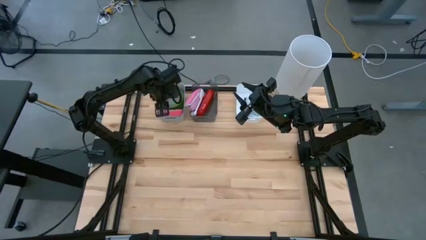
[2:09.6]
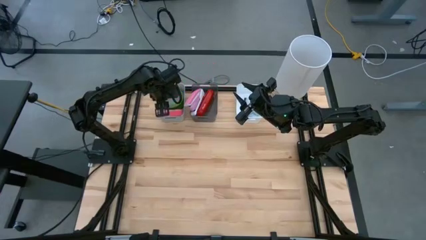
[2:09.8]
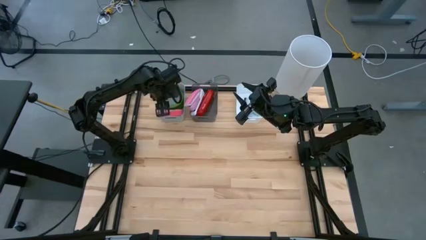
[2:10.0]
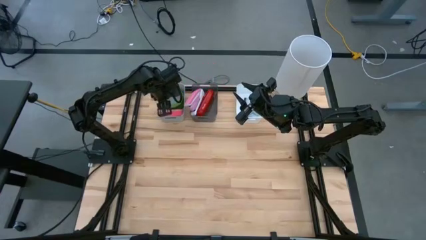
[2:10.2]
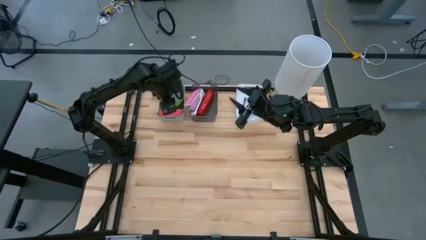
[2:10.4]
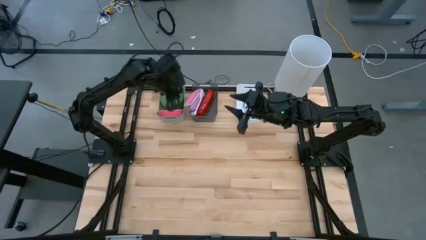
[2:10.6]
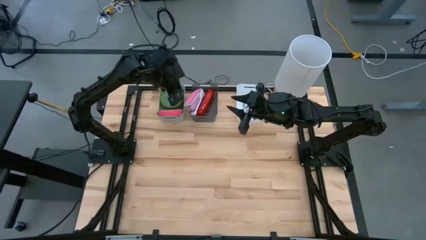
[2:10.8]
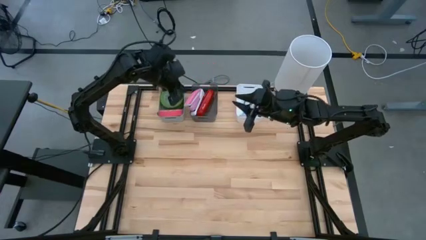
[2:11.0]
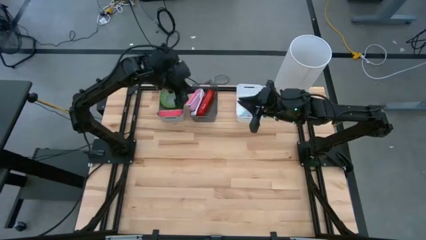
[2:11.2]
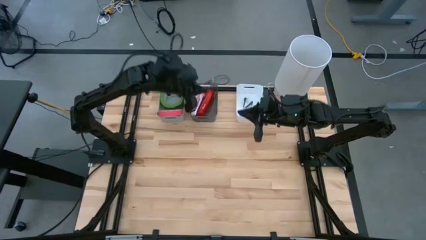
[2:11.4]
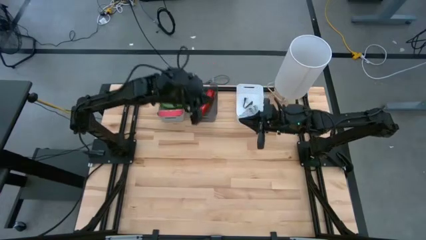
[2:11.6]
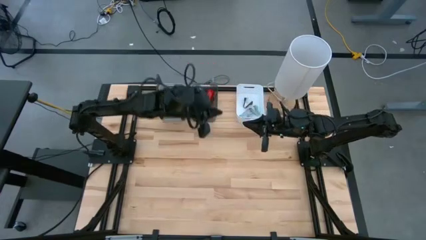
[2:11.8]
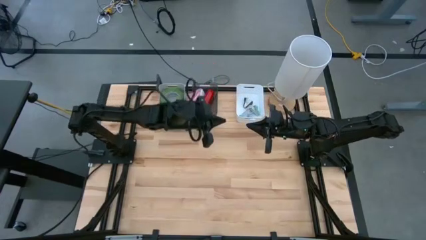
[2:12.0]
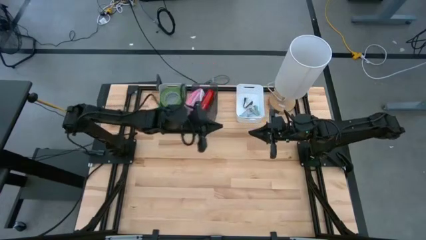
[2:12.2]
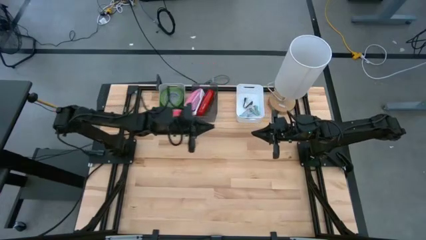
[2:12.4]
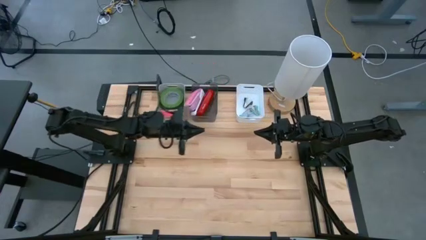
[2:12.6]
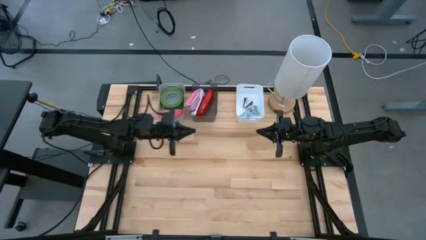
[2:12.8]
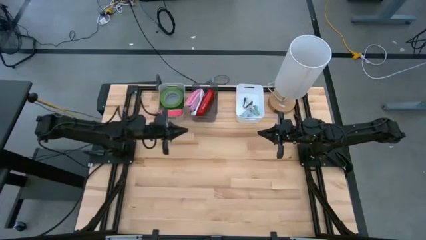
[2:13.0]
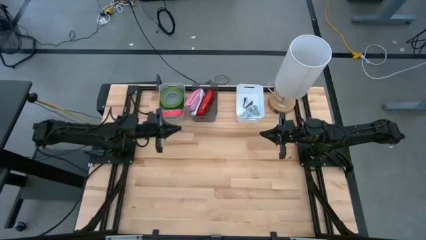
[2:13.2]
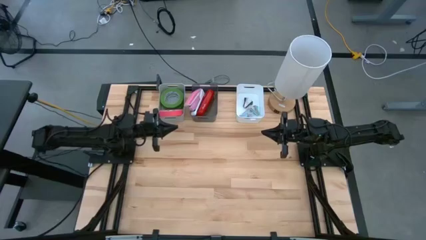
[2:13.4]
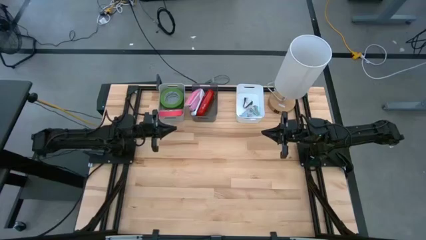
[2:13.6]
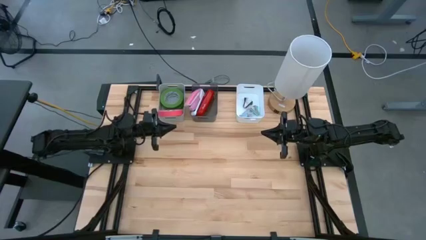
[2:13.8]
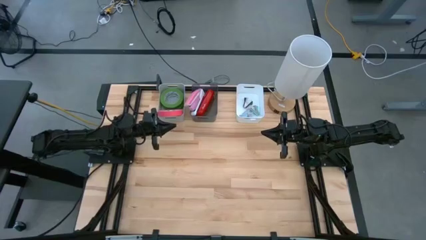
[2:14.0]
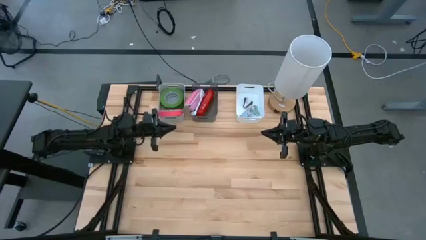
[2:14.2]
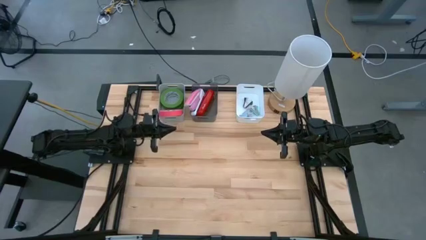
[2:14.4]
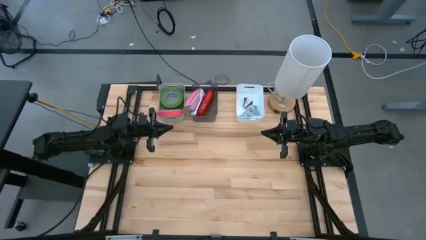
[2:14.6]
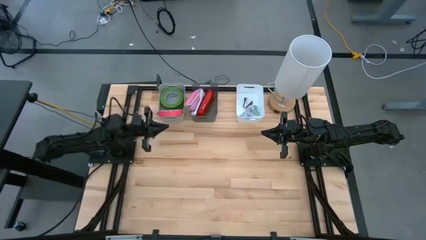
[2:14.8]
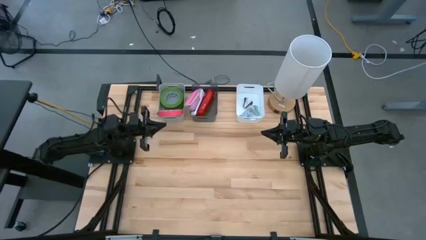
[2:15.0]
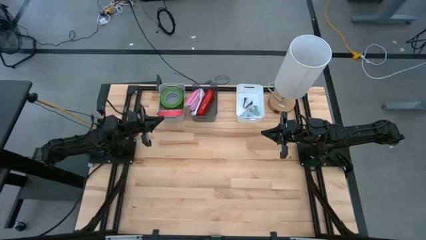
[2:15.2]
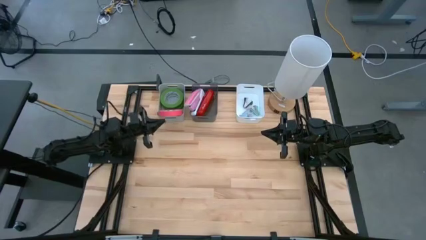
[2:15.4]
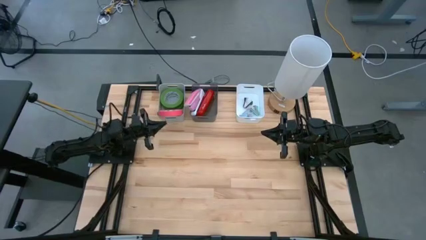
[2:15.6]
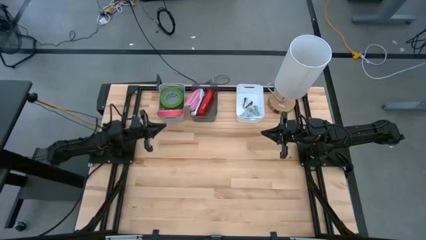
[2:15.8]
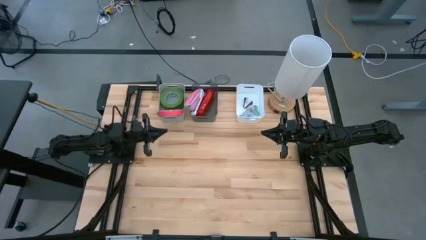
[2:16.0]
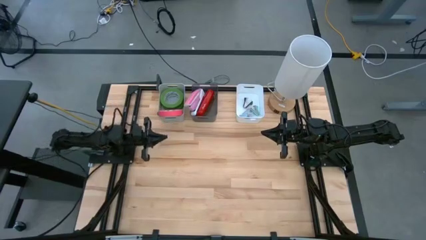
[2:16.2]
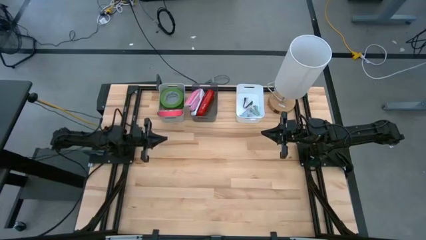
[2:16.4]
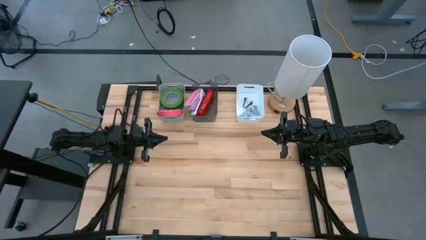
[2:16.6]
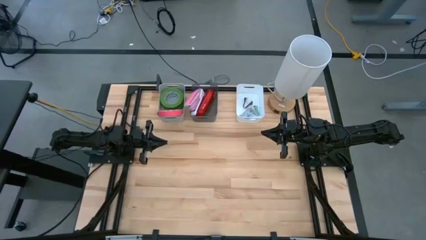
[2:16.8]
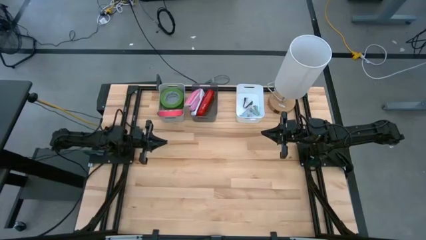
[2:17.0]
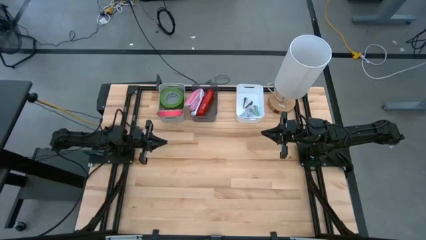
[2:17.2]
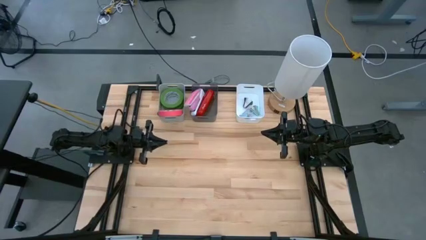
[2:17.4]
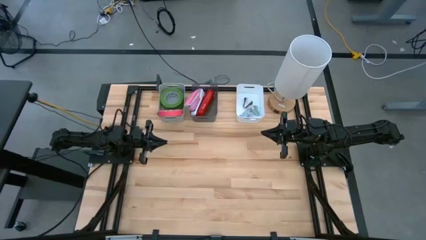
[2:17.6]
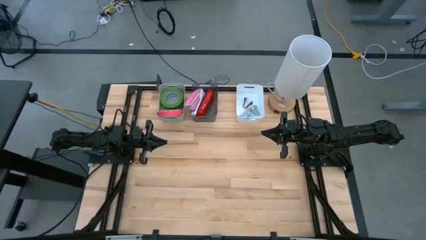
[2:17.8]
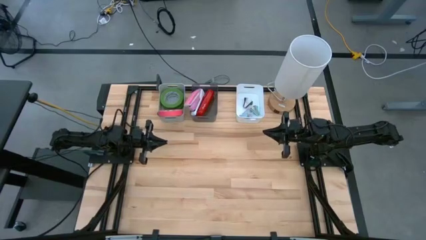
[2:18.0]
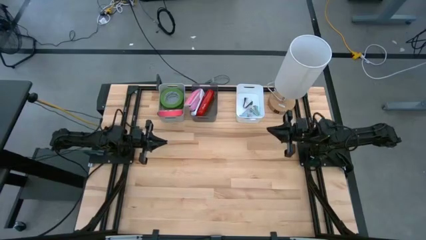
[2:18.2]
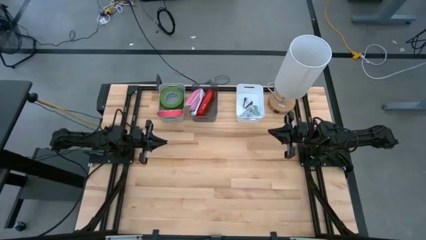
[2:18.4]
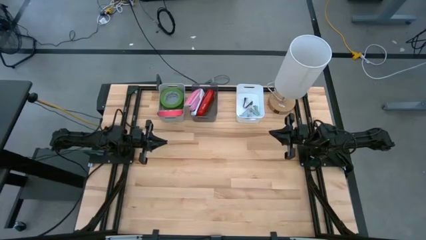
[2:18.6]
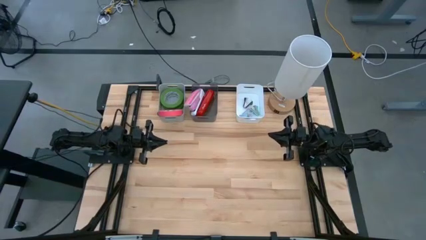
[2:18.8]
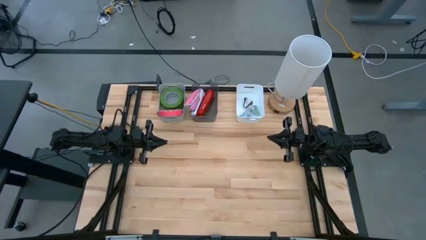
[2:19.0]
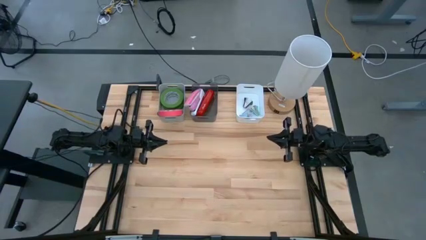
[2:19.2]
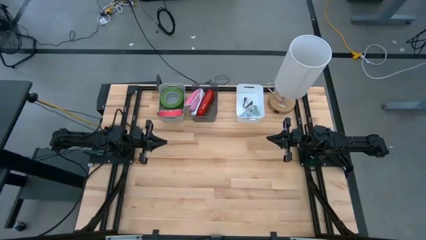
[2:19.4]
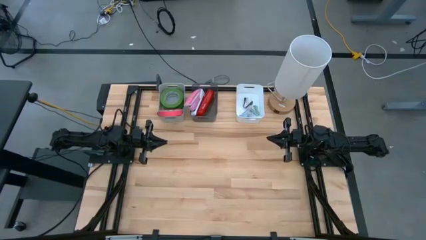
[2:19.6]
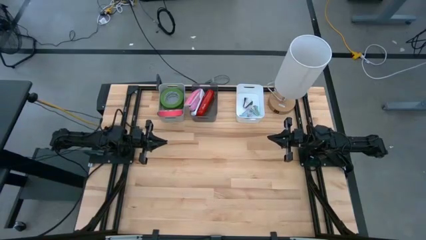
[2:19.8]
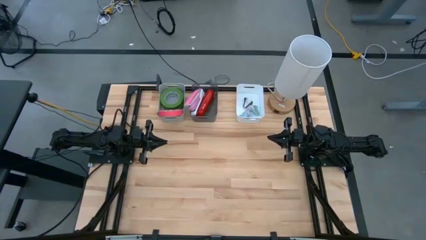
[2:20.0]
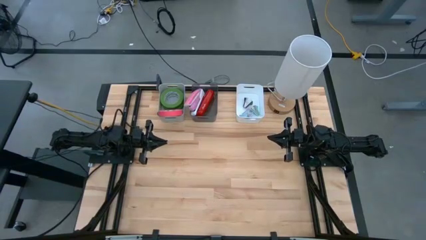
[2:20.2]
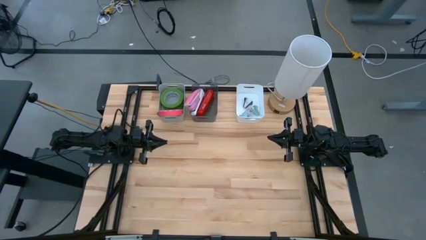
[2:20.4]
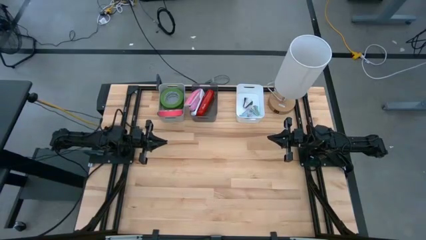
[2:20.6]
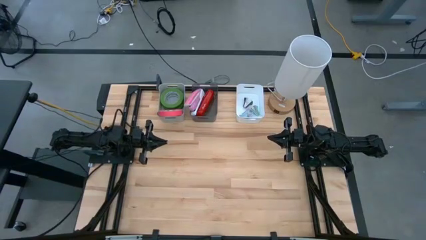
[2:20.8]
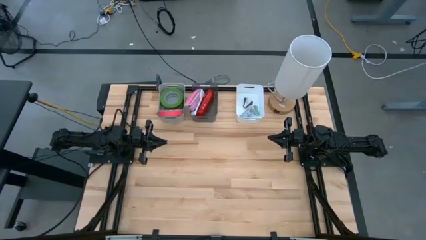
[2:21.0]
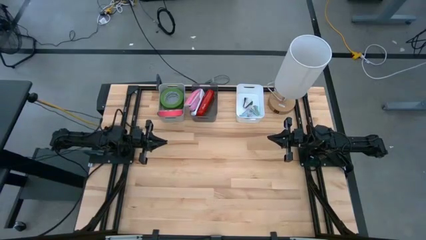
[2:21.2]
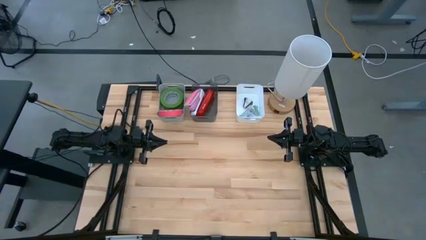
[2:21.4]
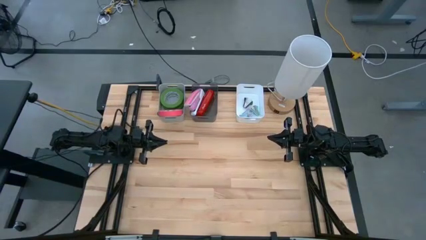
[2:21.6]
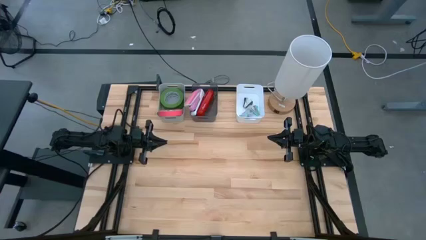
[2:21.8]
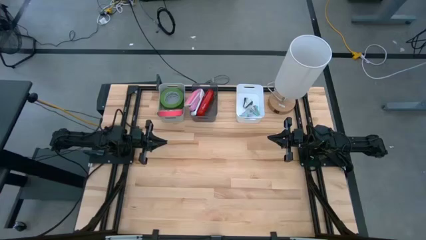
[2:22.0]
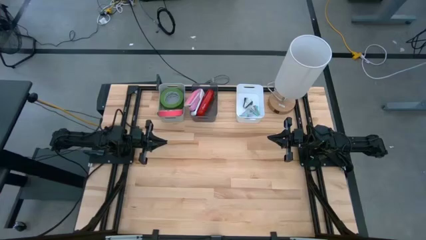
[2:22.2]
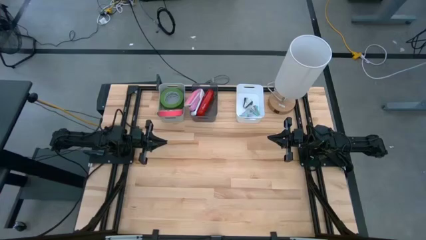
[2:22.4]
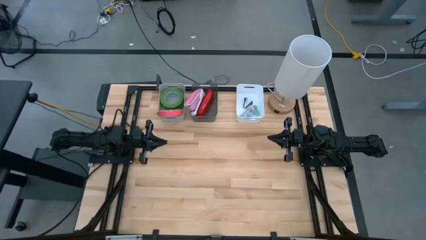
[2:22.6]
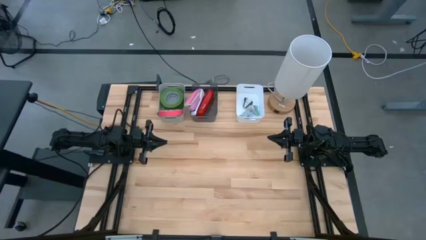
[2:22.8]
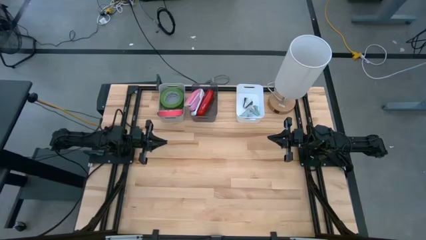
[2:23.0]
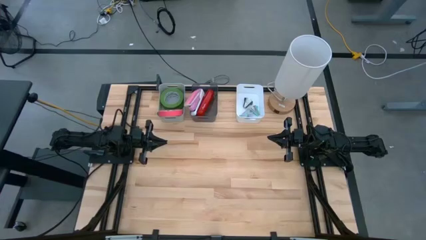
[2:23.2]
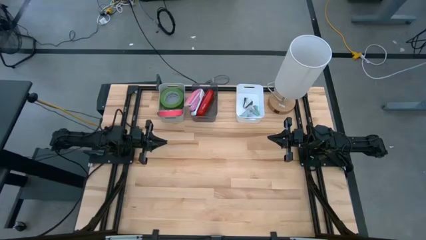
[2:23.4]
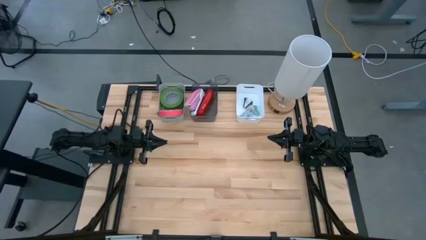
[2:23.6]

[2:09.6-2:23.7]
Task: Pick and place Stapler, Stapler remover, tape
Return to Home Position
